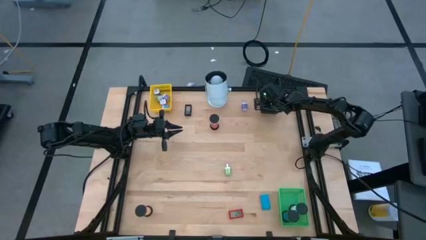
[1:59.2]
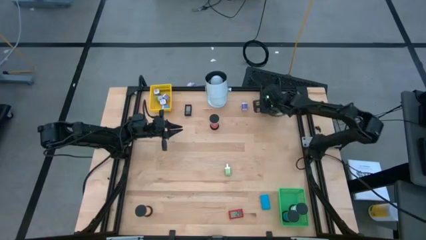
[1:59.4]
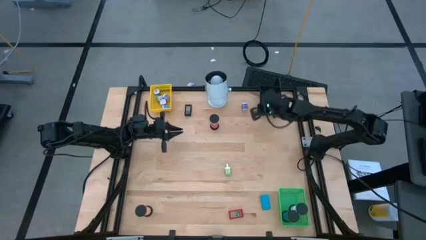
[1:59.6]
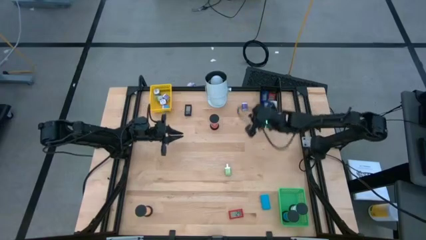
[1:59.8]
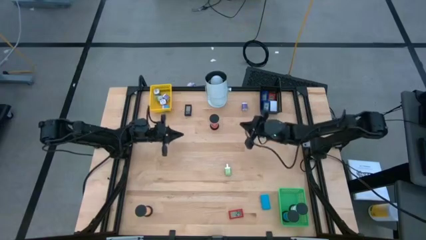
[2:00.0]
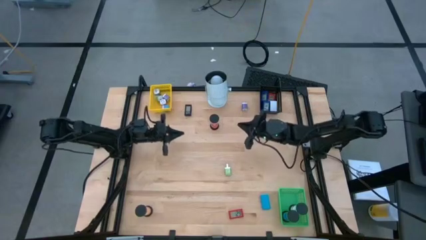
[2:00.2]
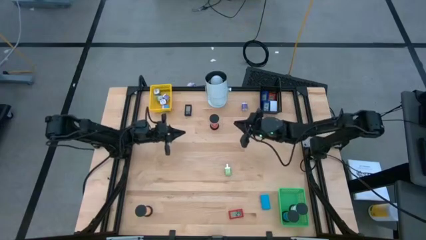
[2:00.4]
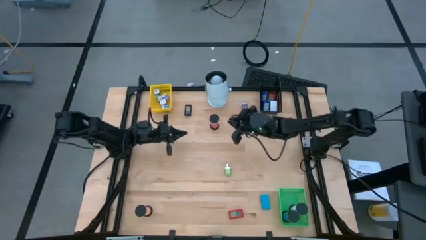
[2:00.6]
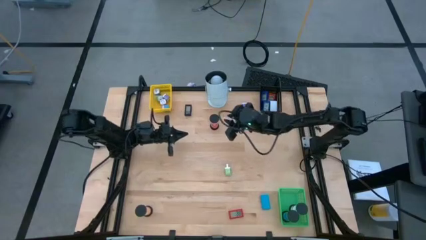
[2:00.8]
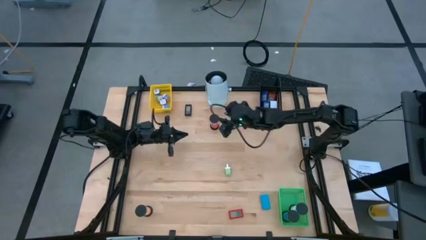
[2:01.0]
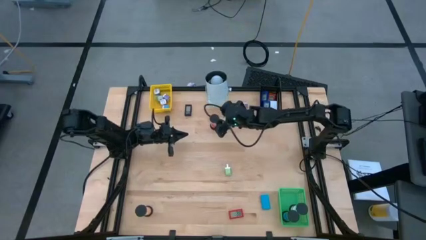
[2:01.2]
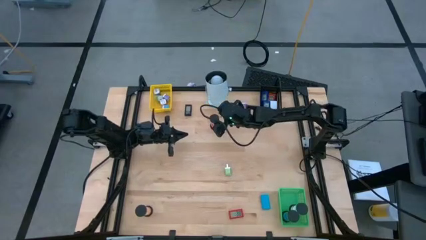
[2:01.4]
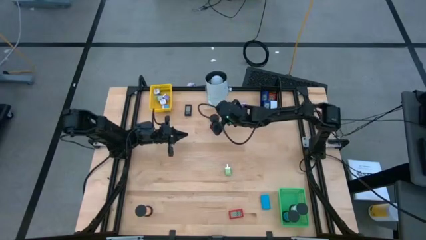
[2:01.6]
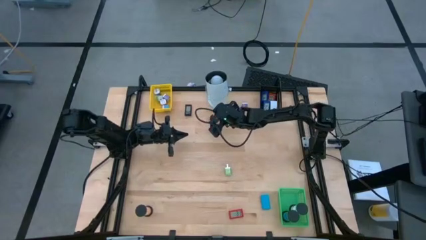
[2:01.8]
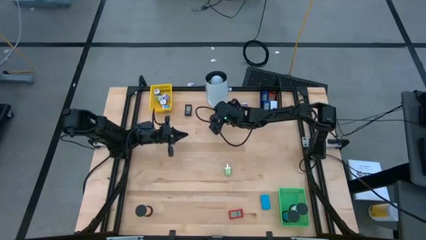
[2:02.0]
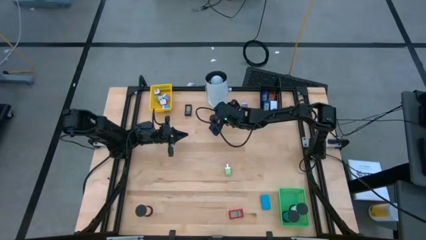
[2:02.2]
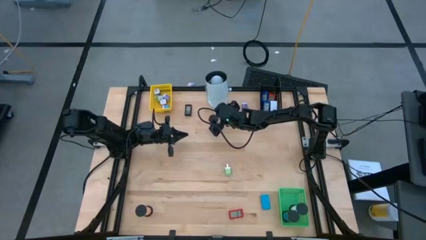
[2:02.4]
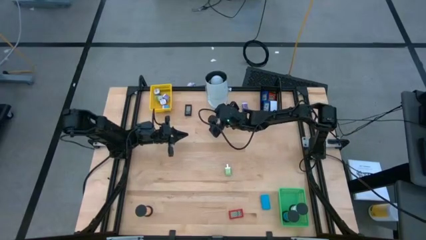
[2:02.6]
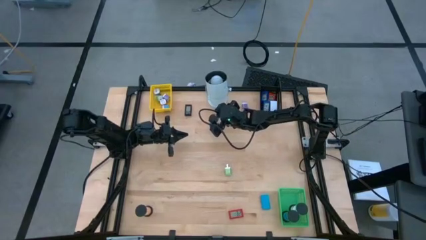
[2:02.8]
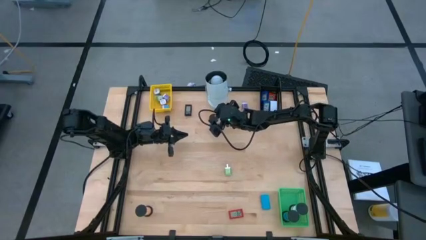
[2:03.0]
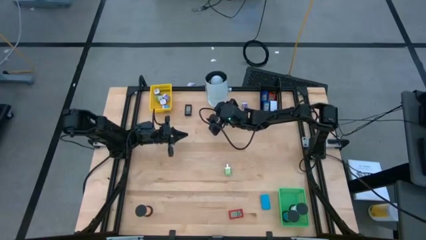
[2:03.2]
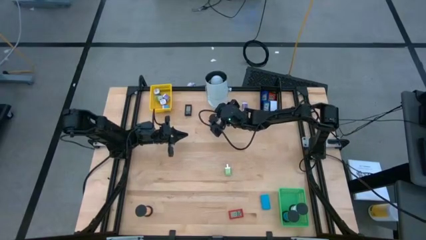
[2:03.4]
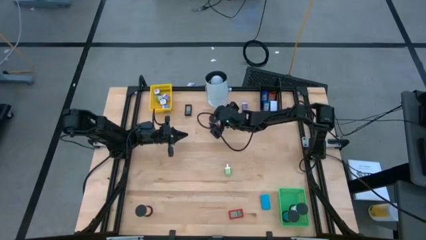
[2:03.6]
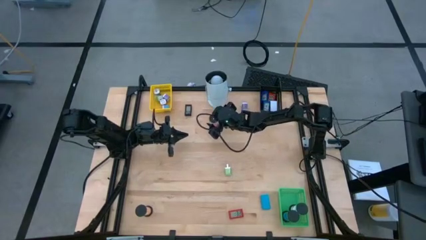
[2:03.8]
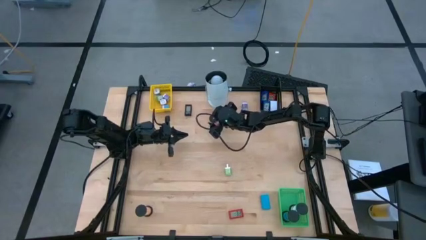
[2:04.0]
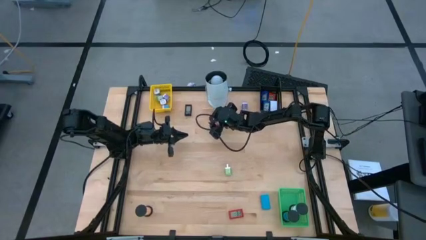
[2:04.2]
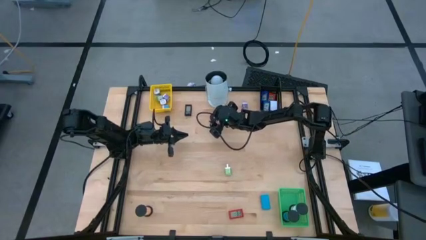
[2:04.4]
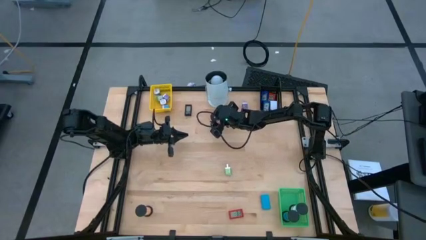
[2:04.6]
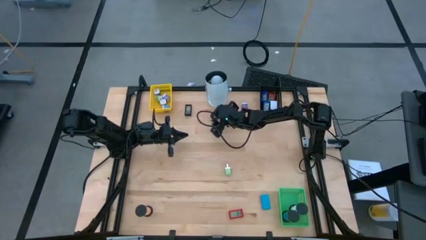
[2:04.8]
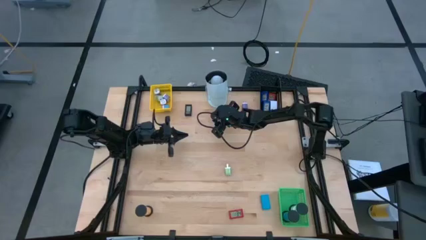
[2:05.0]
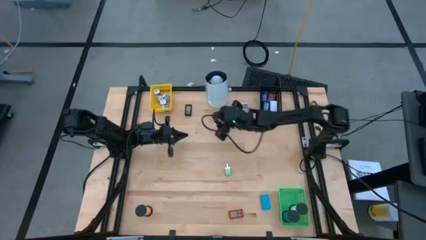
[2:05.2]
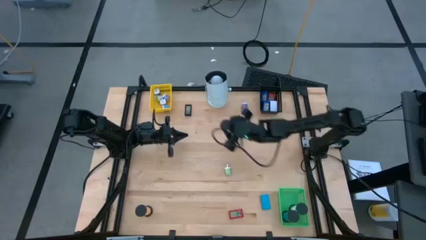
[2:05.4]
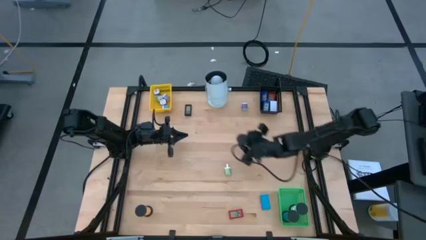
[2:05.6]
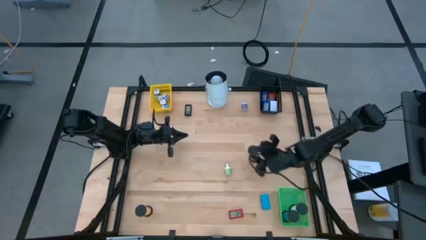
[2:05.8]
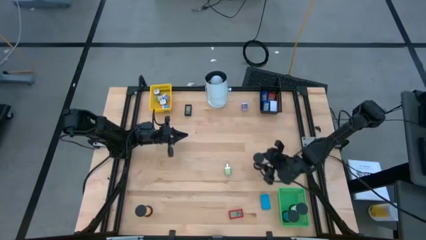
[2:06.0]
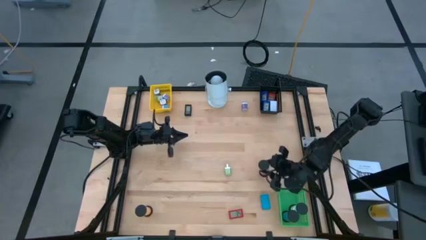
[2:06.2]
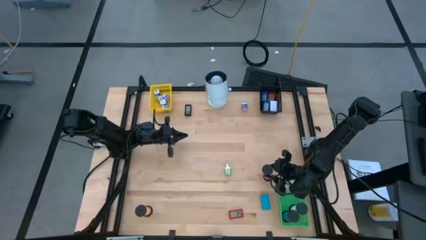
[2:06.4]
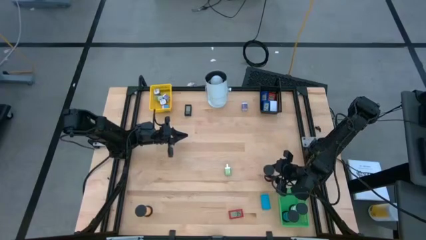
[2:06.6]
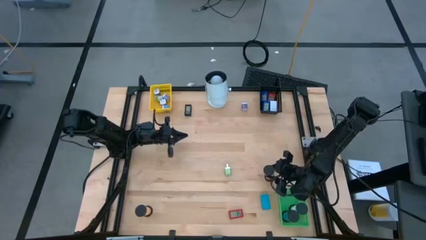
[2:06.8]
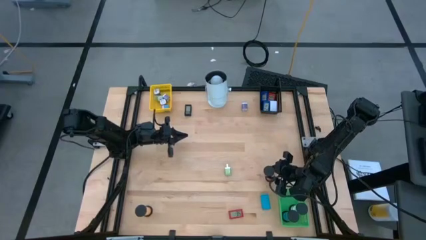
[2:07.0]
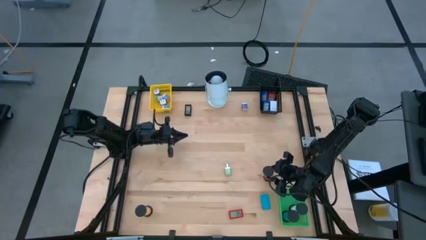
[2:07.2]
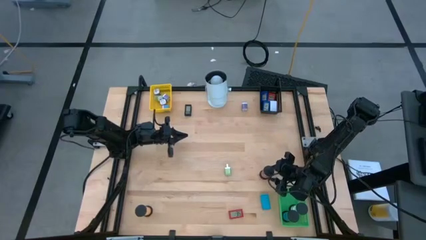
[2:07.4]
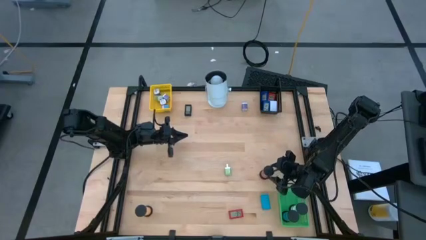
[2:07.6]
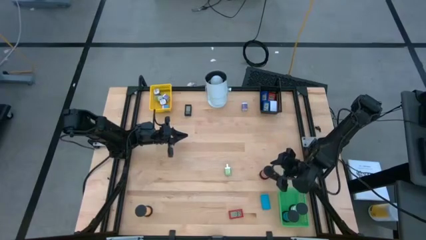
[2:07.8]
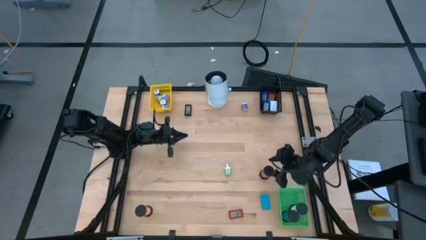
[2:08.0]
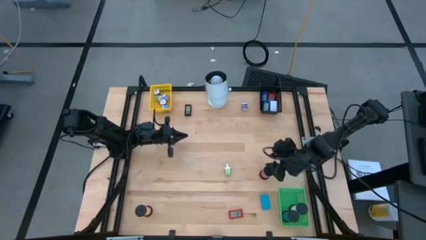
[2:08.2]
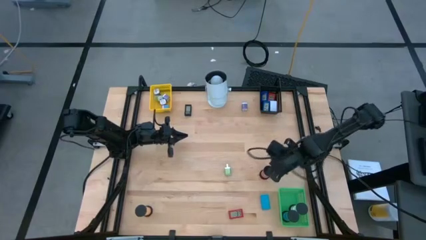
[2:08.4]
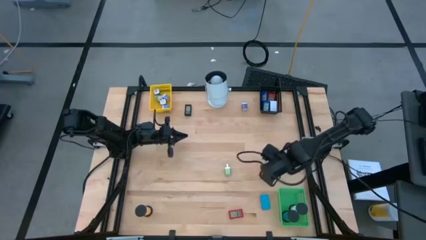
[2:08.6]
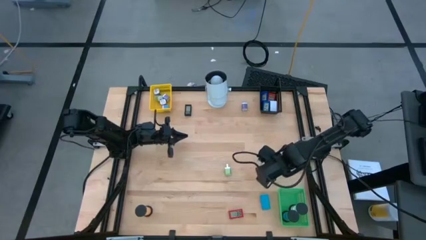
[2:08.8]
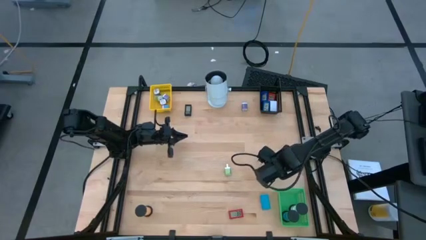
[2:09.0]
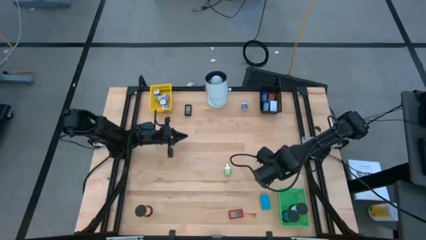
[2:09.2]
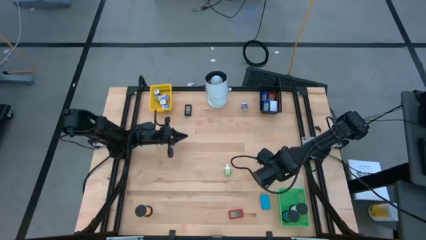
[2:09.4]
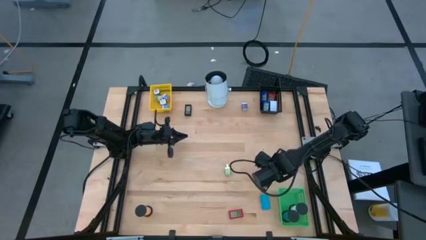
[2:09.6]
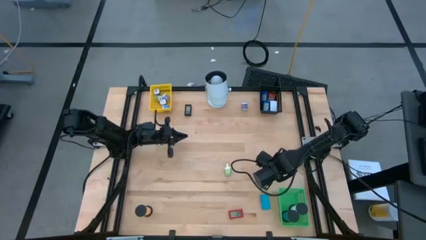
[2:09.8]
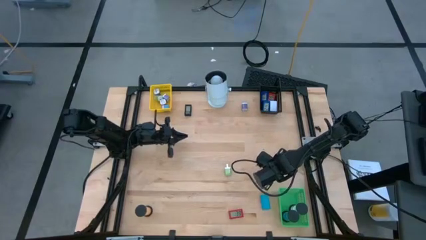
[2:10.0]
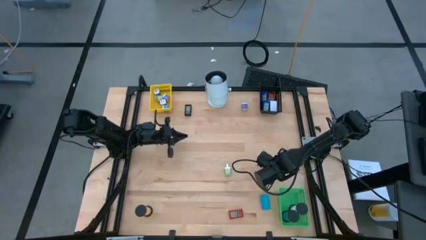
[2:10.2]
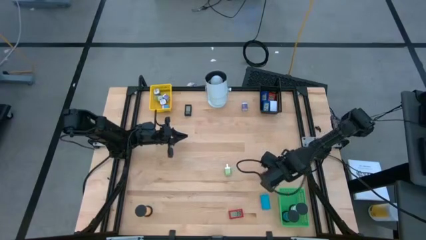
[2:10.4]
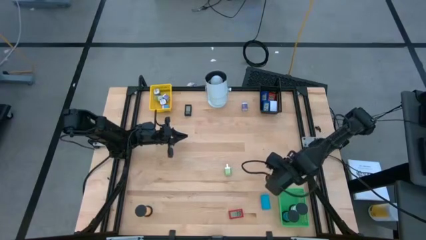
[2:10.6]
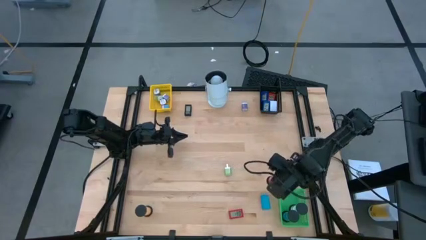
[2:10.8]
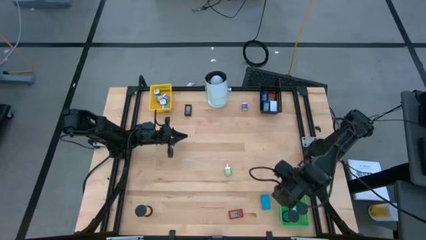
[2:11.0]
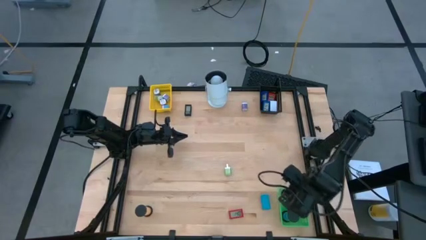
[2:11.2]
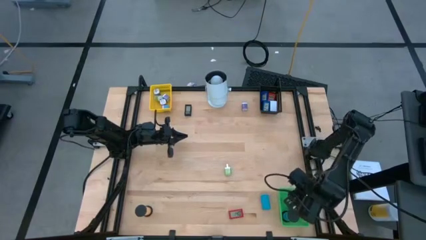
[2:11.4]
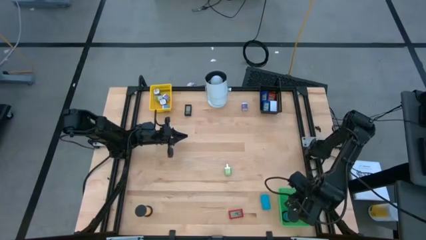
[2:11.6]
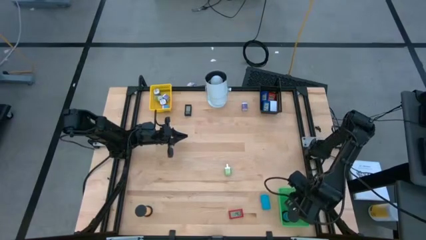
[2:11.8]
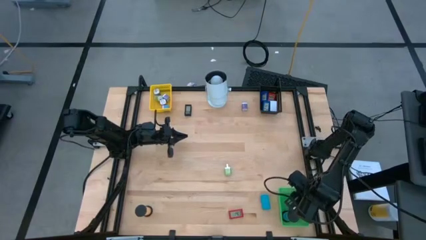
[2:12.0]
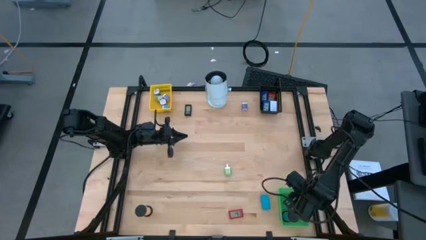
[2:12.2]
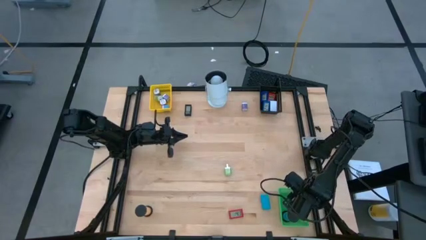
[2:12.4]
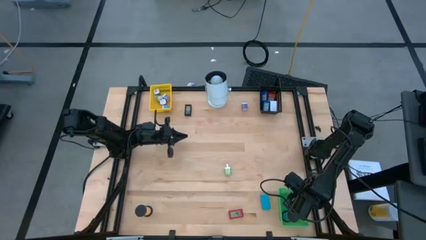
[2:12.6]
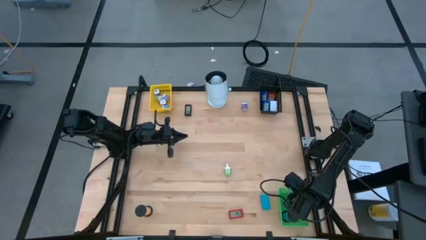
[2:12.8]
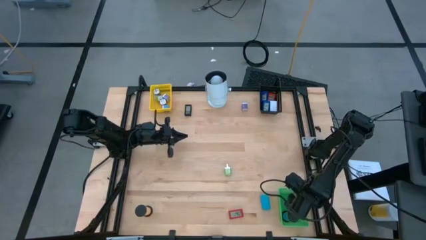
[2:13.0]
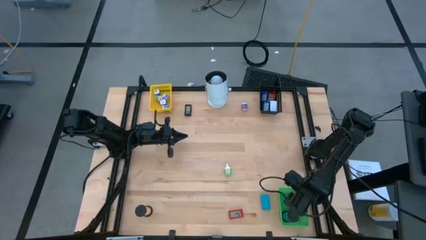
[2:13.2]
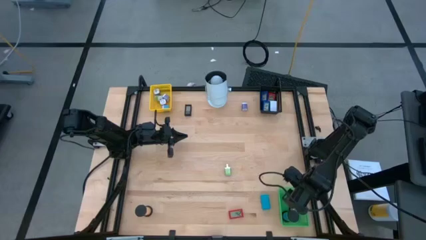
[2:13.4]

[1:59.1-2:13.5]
Task: Pick & Place Office items
Put the red hourglass into the green bin

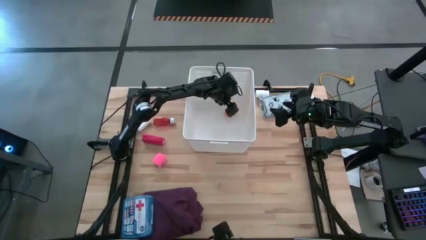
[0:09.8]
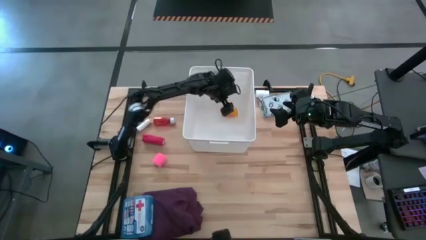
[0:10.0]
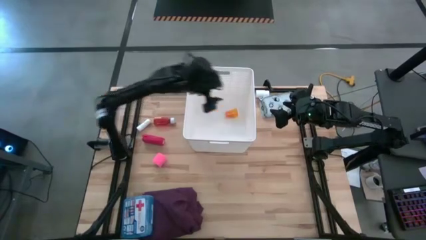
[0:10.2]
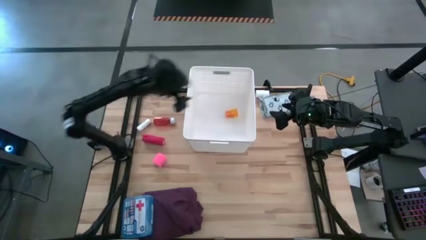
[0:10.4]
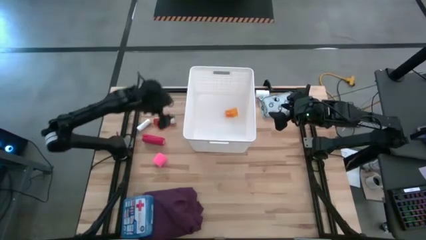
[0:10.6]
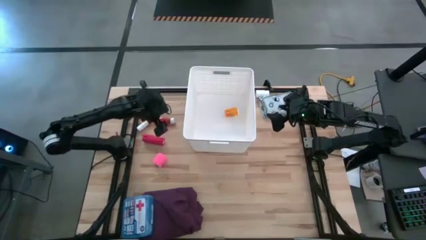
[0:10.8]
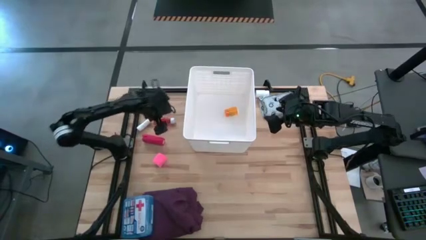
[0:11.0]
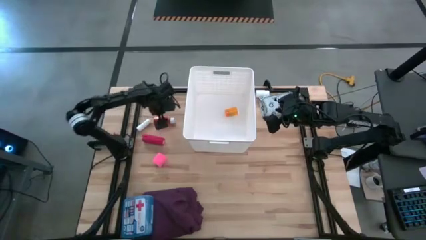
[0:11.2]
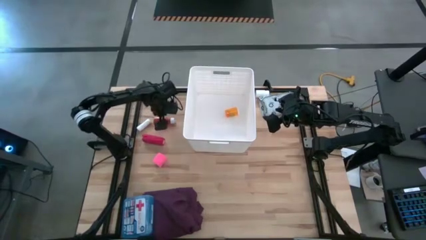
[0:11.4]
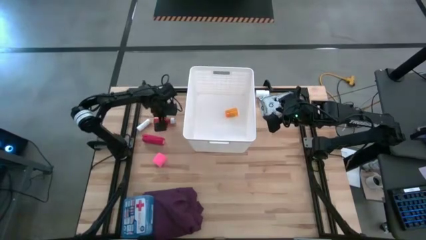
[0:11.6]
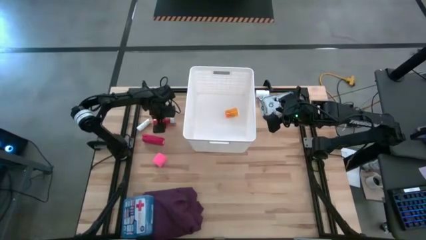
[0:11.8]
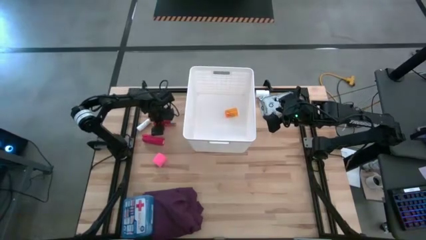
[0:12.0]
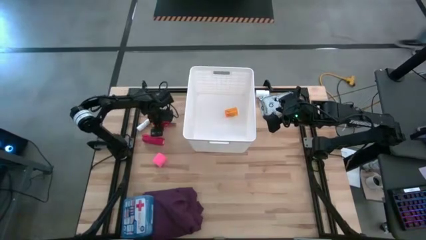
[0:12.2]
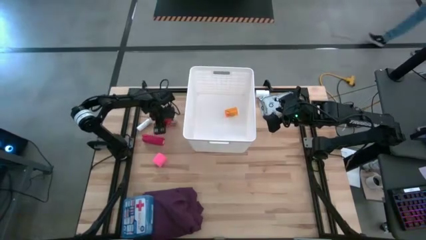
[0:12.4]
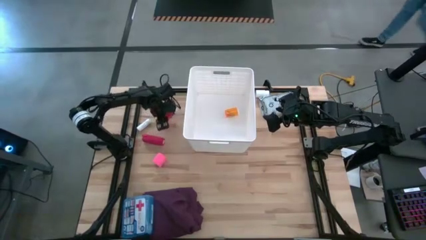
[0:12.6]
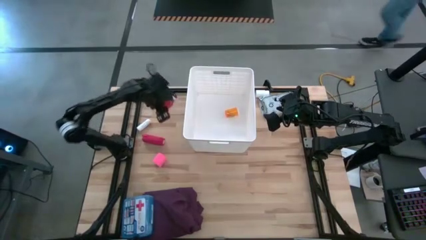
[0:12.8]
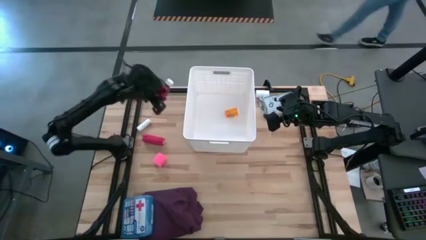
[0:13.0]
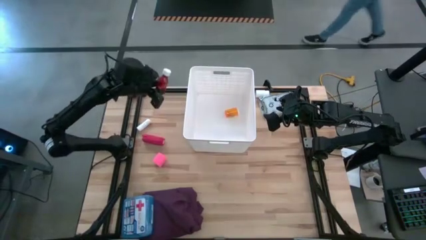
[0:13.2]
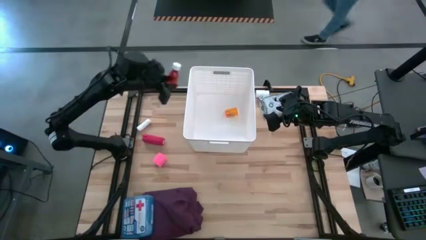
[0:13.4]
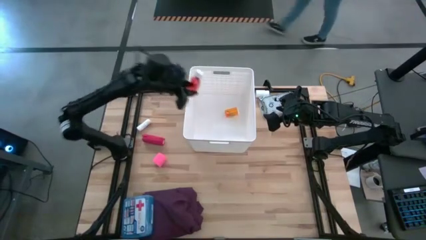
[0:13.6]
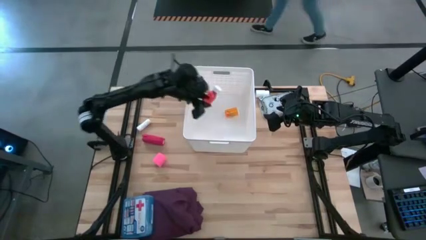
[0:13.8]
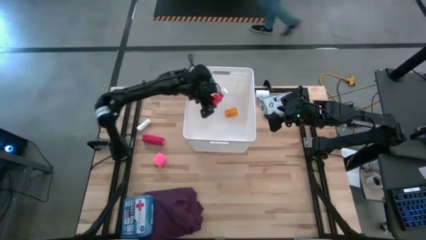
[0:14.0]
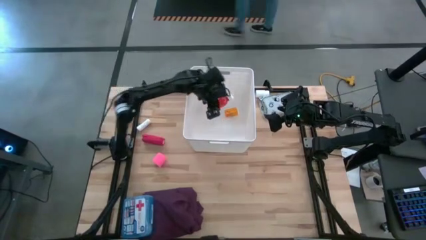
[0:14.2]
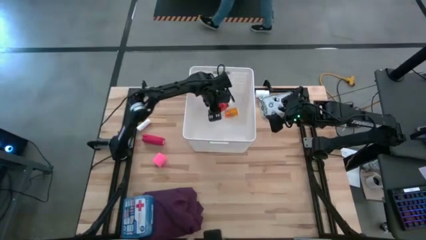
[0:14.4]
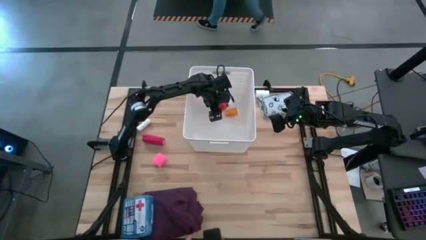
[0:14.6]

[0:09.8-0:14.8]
Task: Pick & place medical supplies in basket/bin
Put the red medicine bottle into the white bin
